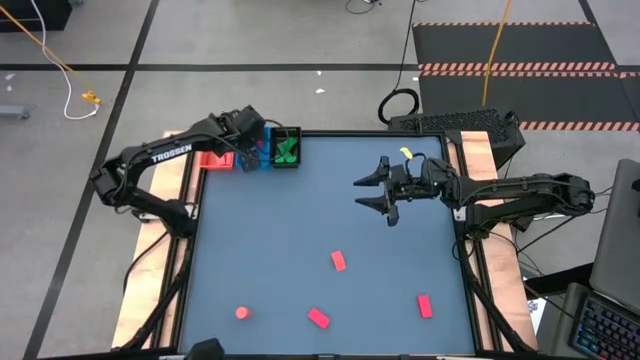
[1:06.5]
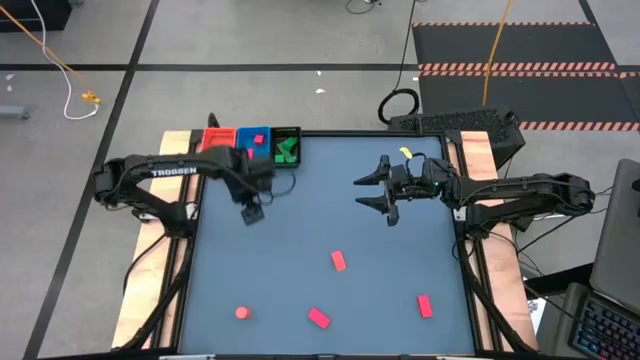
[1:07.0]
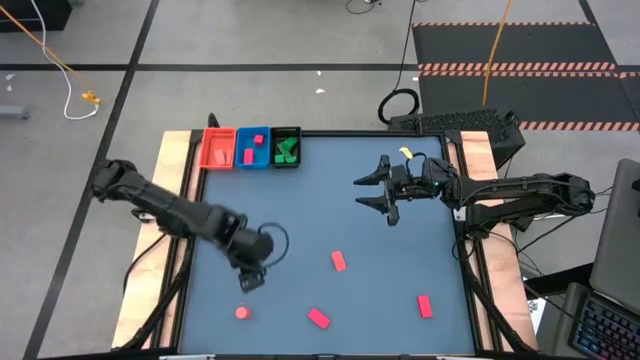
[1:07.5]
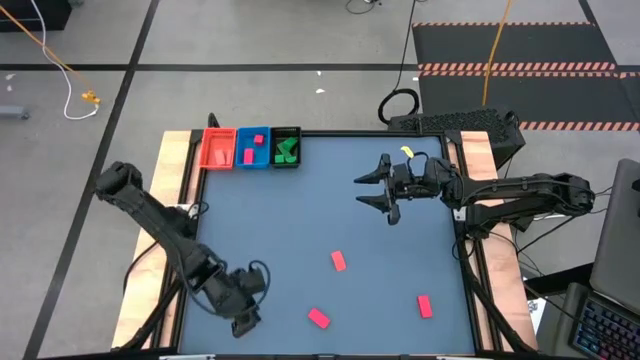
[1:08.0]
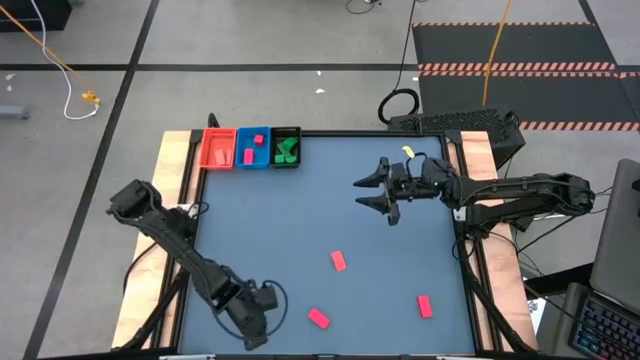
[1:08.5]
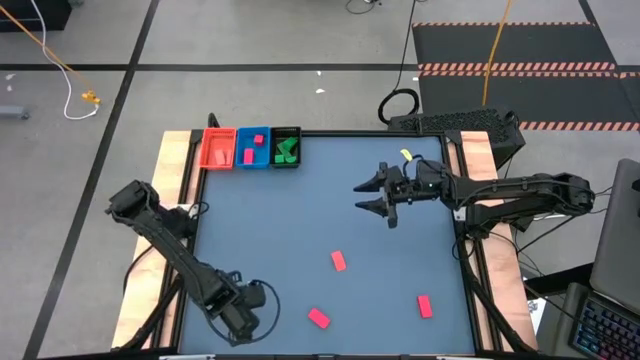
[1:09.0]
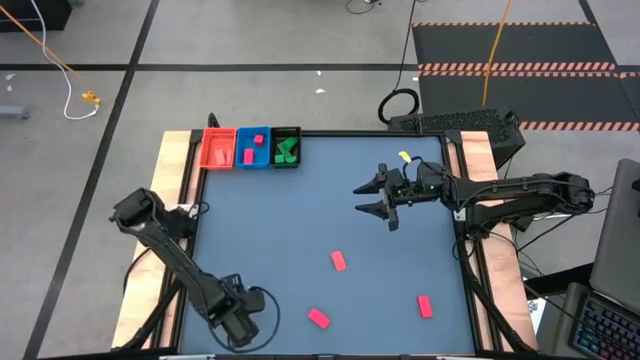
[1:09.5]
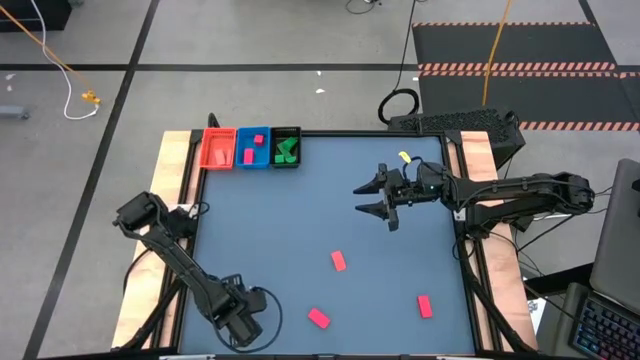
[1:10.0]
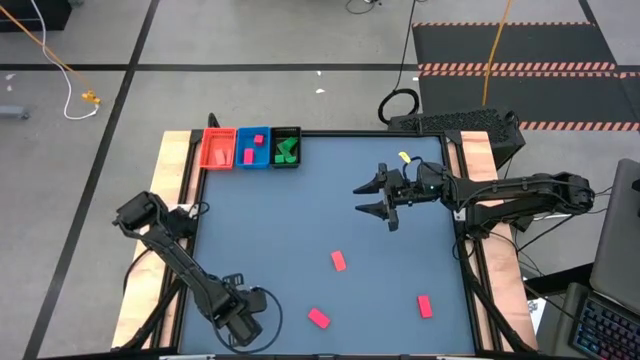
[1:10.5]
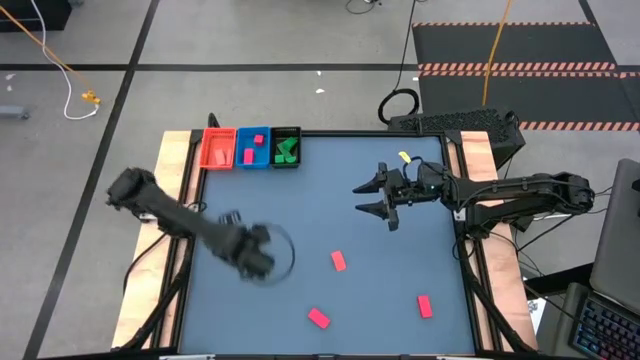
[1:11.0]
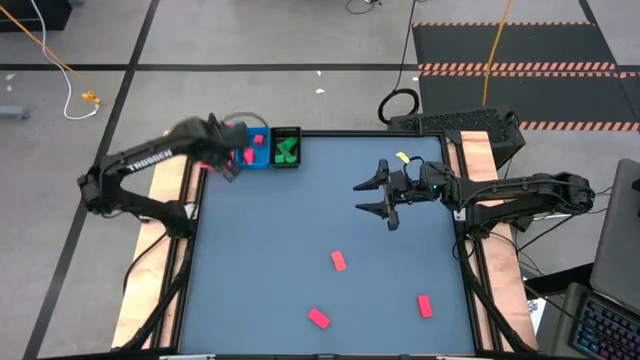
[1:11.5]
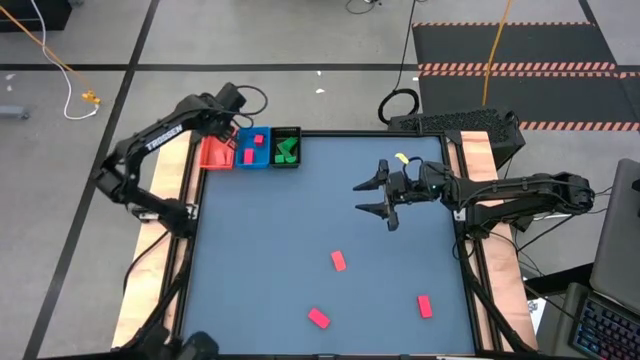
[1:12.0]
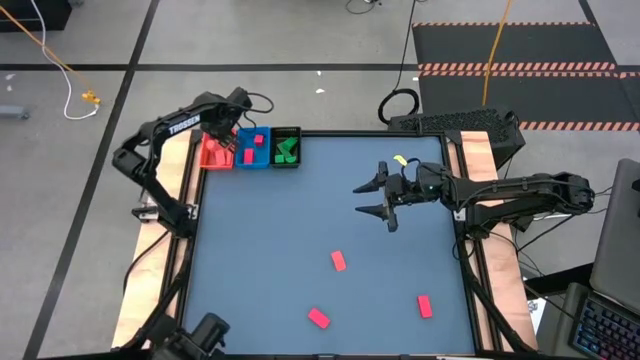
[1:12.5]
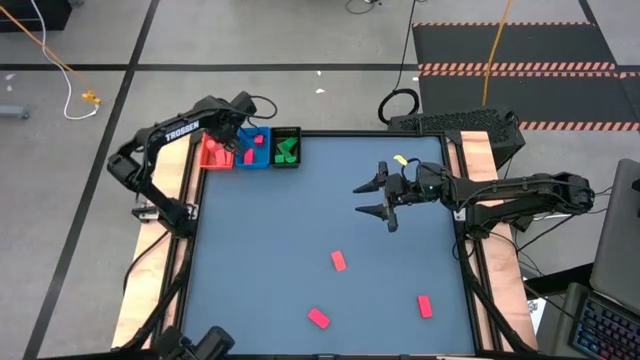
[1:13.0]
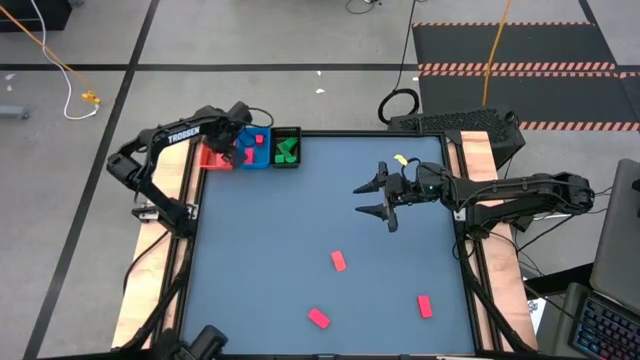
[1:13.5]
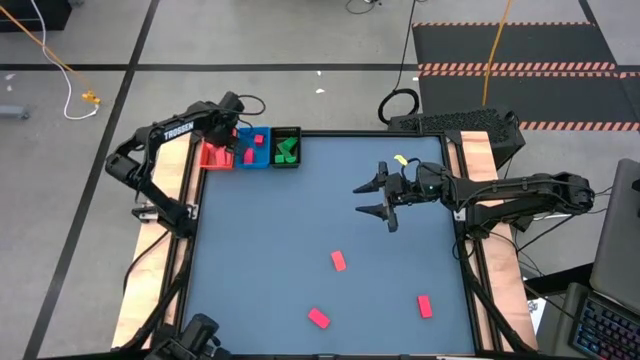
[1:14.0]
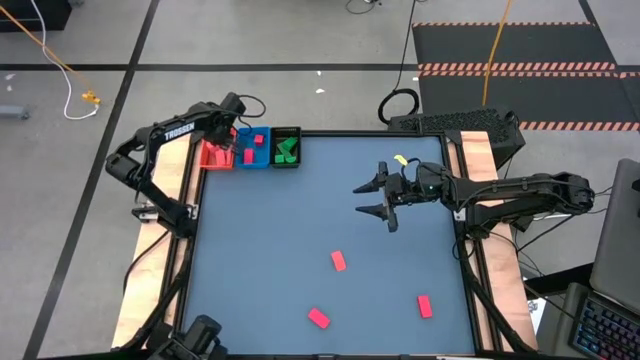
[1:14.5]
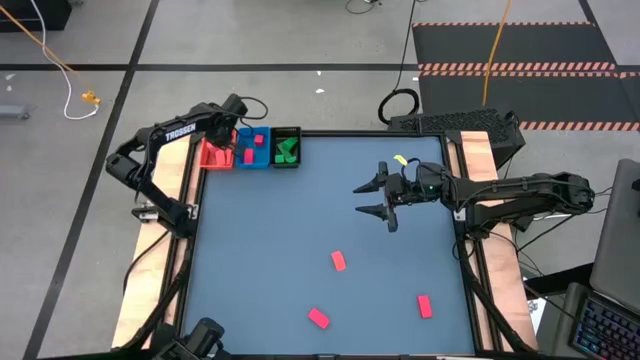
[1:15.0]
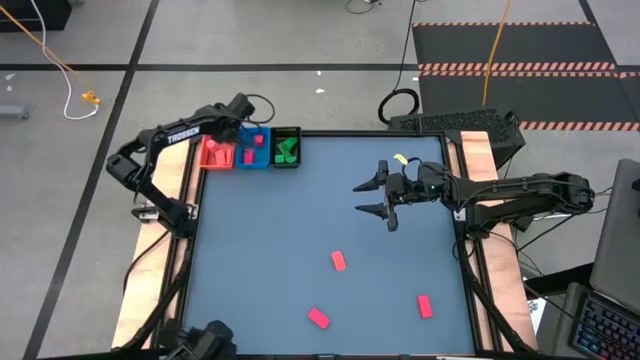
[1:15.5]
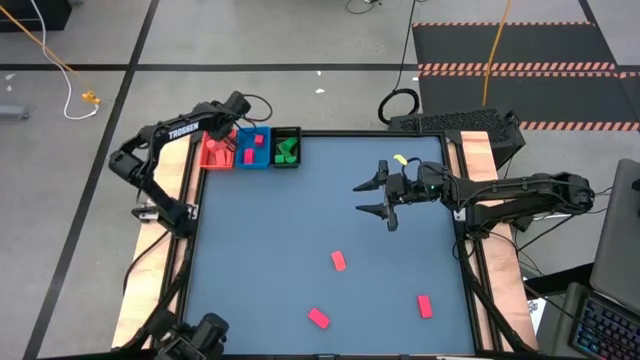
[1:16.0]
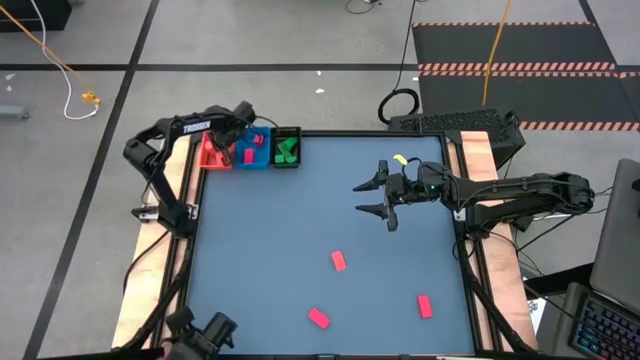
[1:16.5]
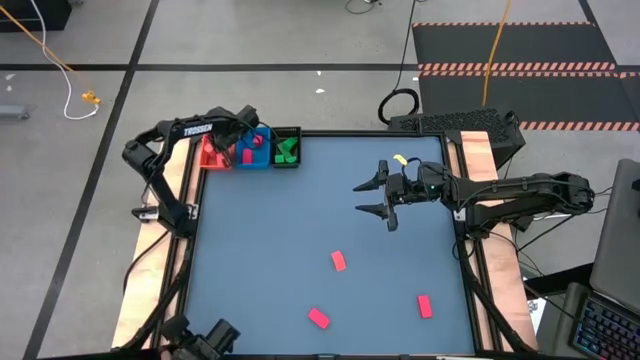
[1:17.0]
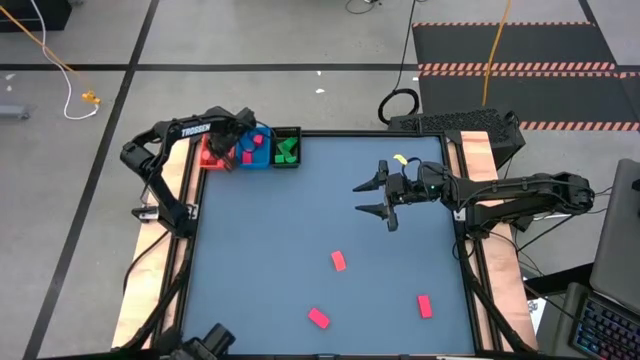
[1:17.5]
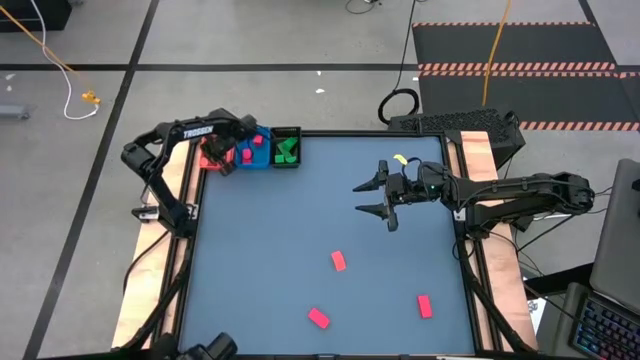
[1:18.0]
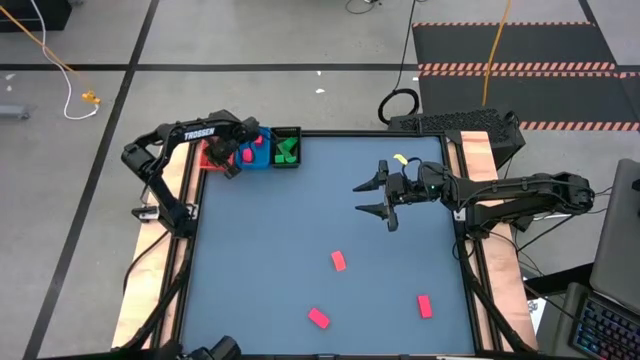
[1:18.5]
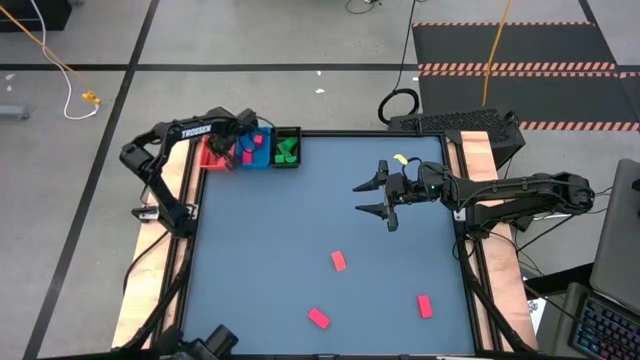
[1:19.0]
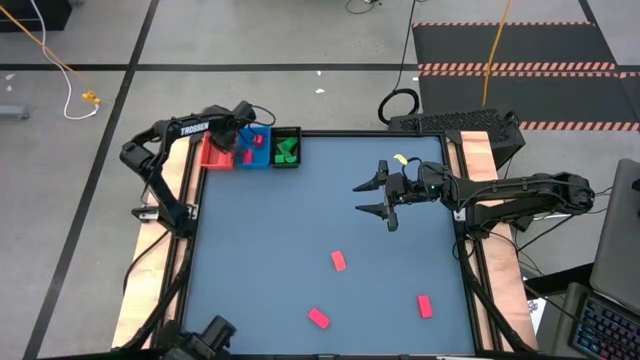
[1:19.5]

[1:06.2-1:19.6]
Task: Sort & place blocks by color
Put the orange block into the orange bin

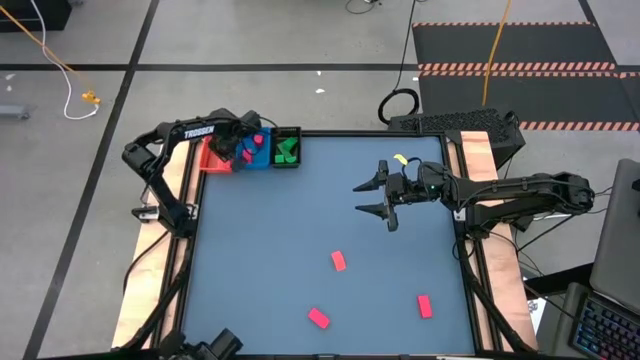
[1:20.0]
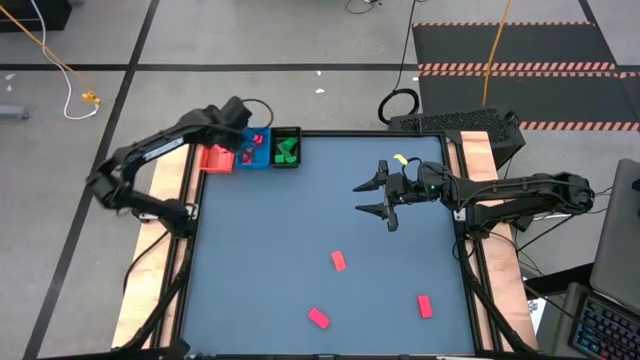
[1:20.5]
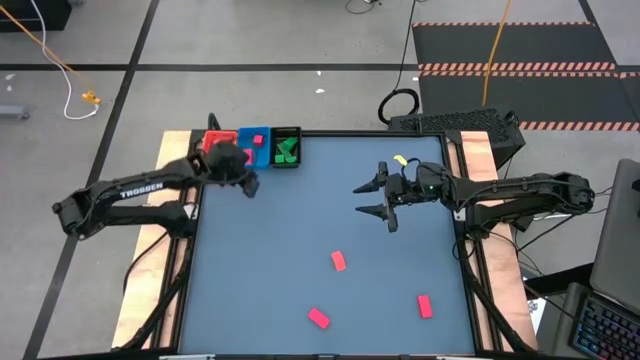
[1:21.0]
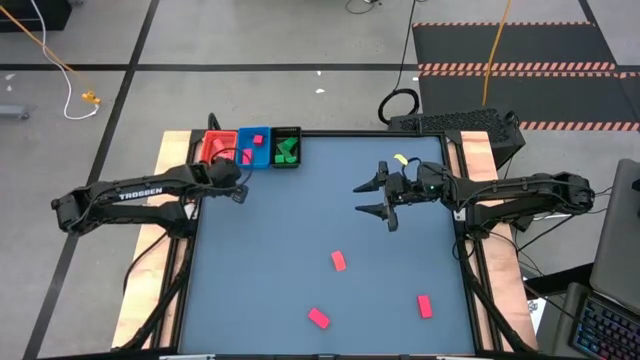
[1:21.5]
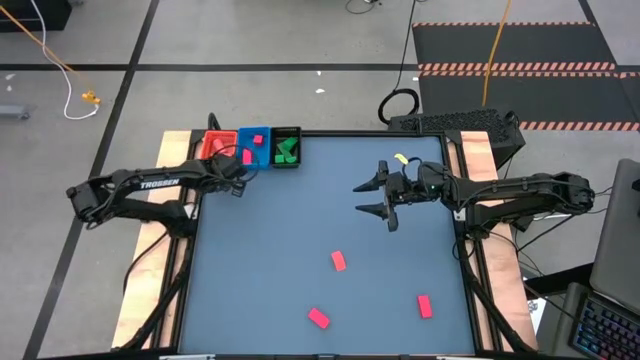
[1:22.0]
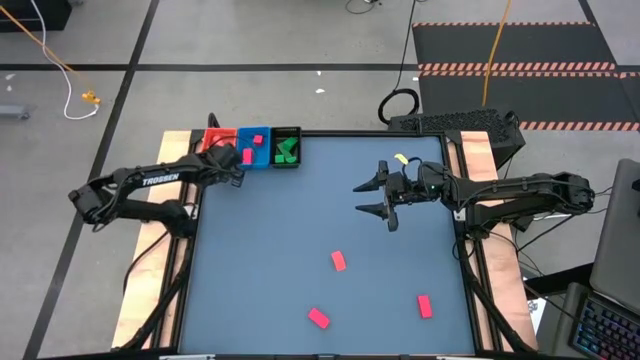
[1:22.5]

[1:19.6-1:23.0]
Adjust the orange bin

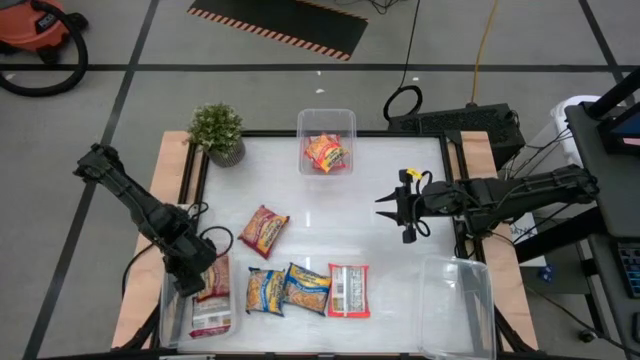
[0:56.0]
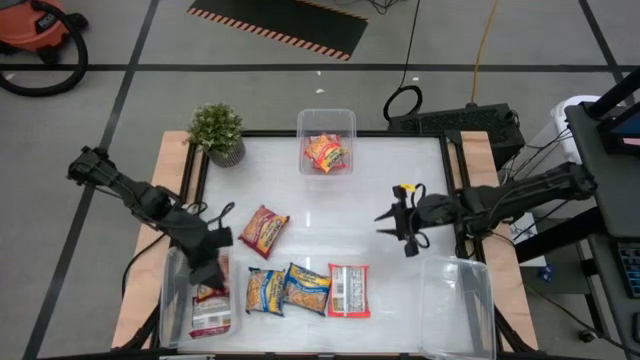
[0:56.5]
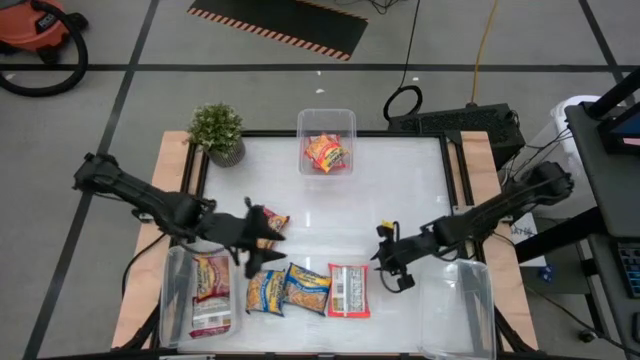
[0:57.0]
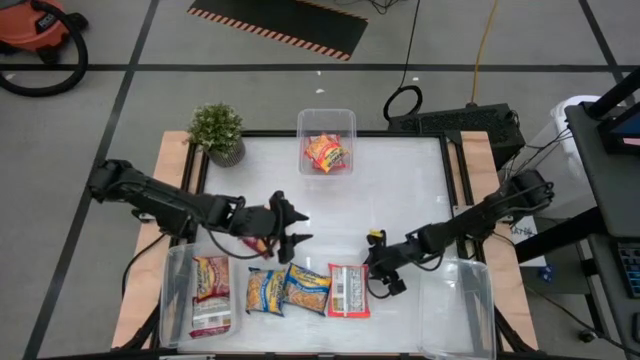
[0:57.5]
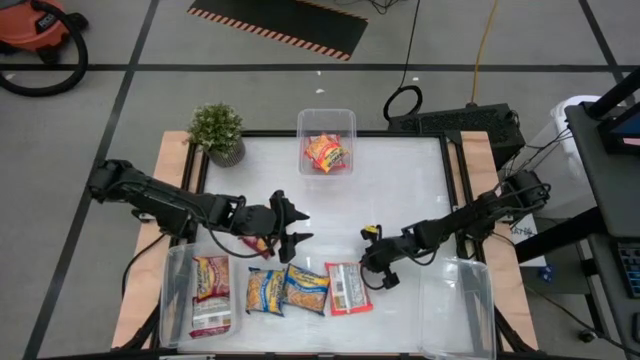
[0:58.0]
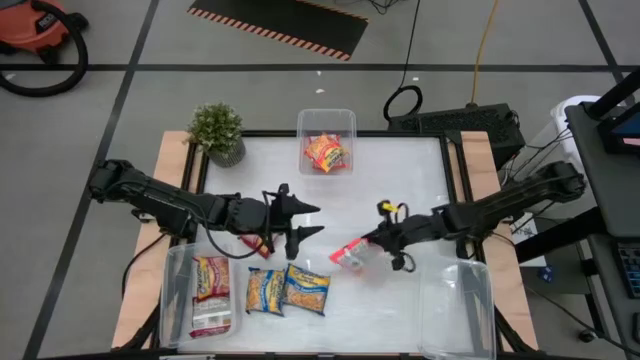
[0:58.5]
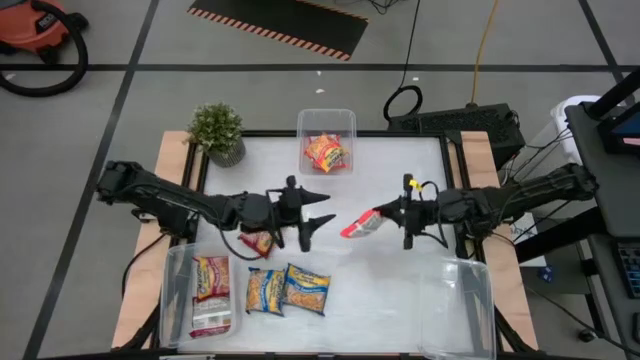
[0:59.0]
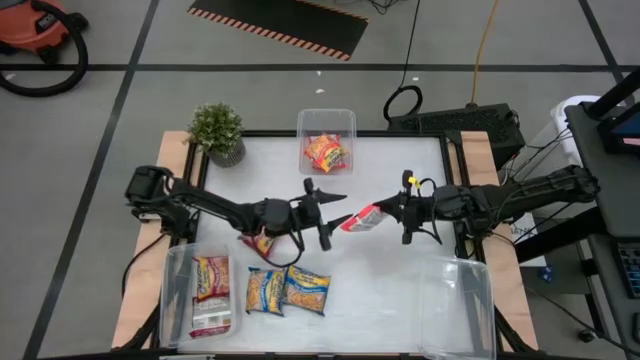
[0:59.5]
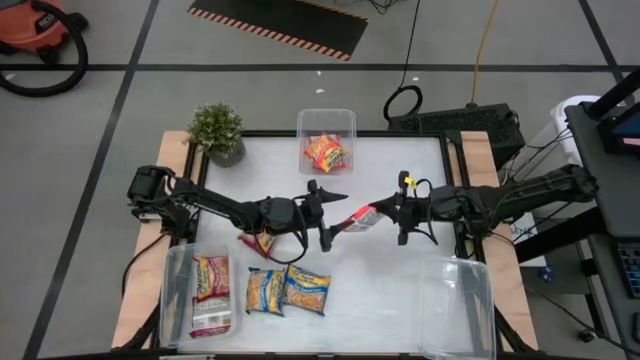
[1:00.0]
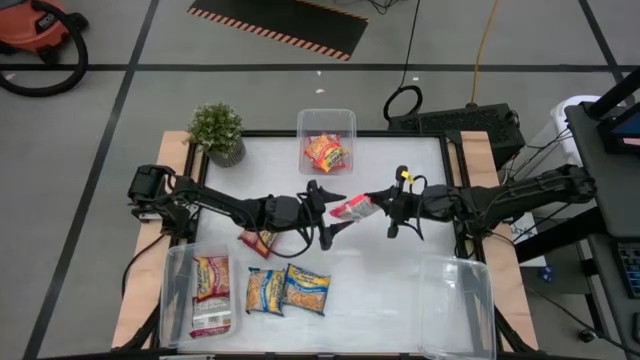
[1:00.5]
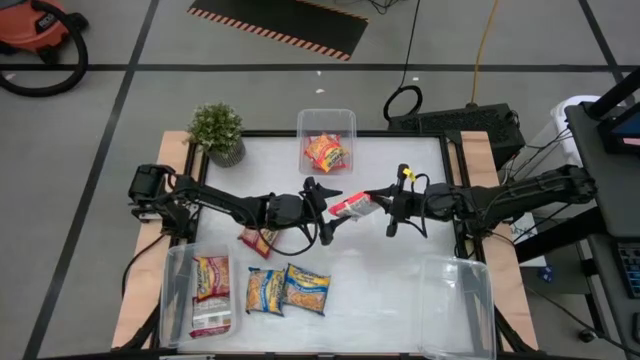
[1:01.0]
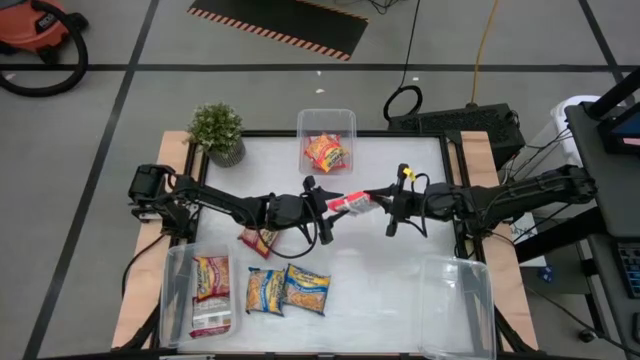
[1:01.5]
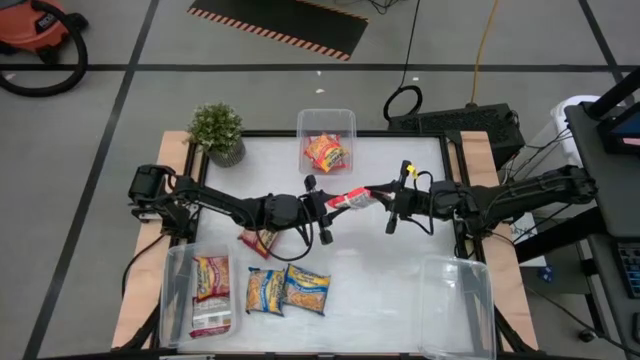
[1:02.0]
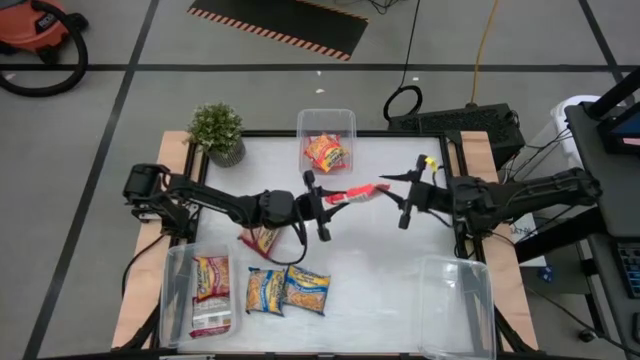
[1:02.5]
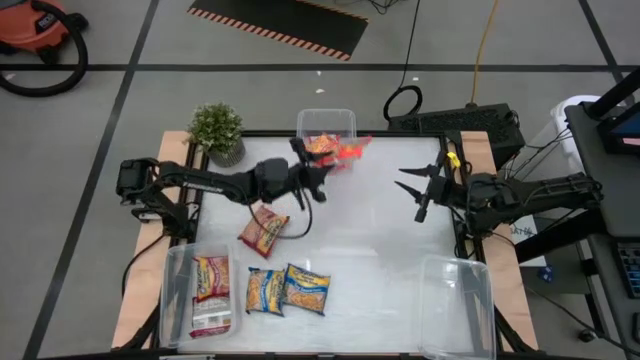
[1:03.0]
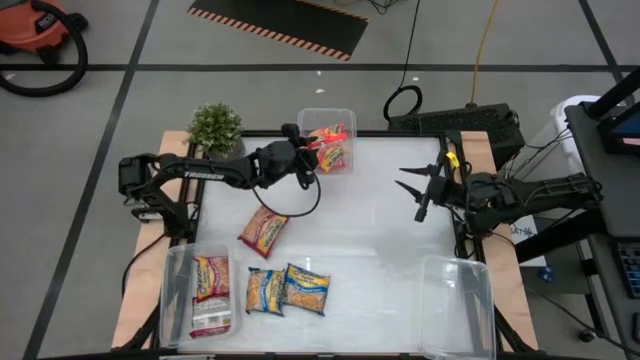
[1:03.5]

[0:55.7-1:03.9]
Task: Sort Maruchan noodles
Put the orange noodle pack into the top transparent bin
